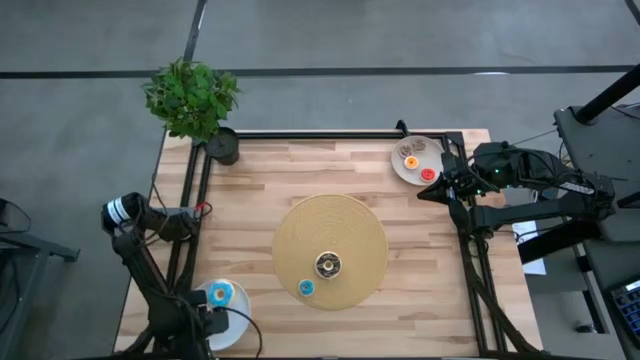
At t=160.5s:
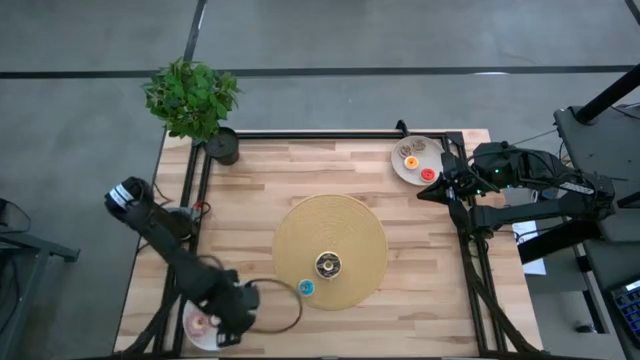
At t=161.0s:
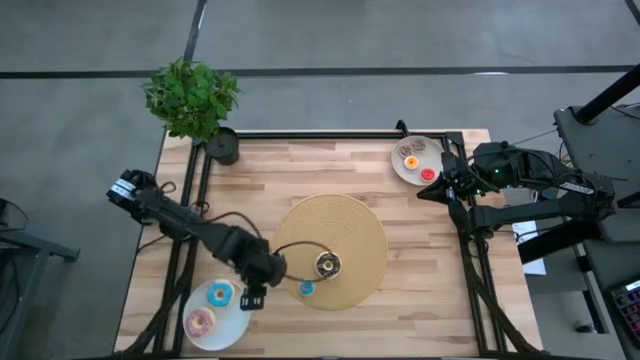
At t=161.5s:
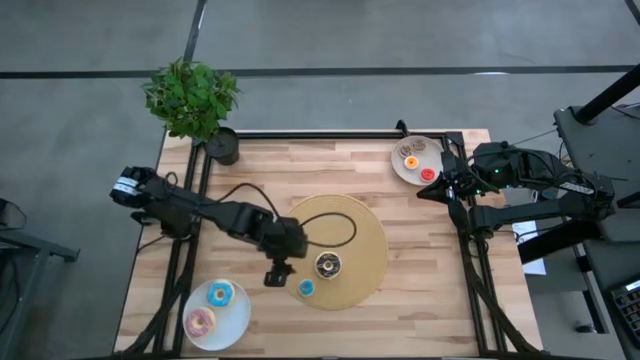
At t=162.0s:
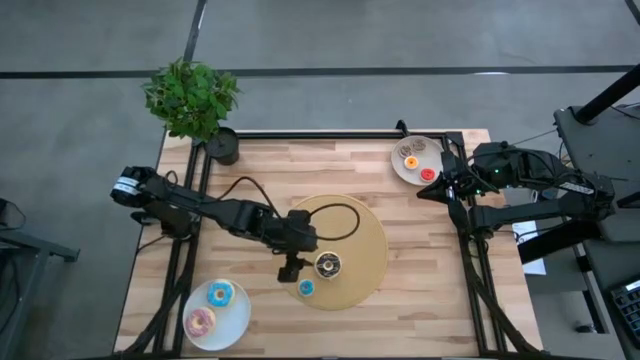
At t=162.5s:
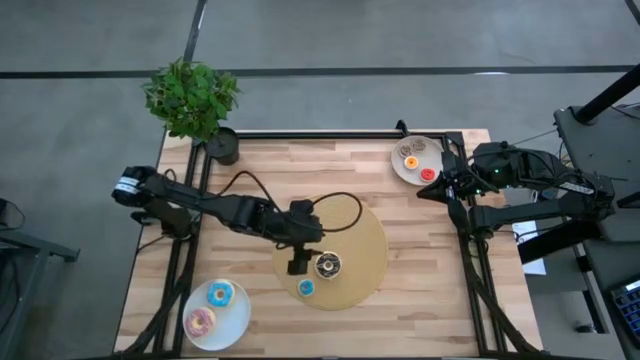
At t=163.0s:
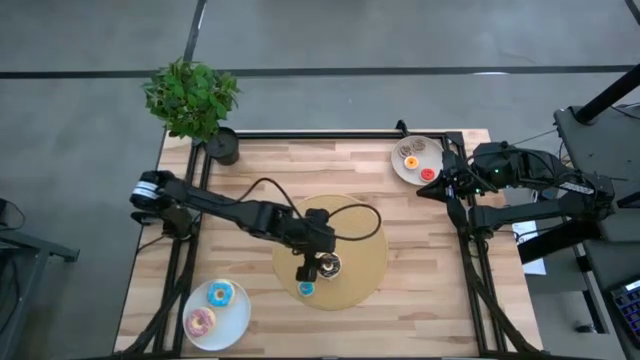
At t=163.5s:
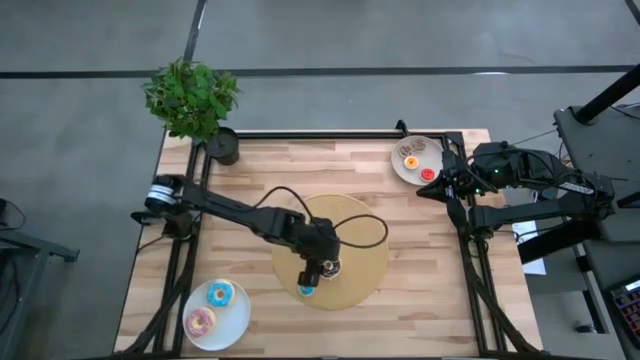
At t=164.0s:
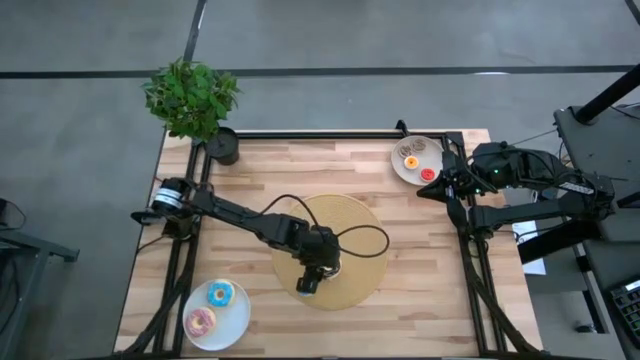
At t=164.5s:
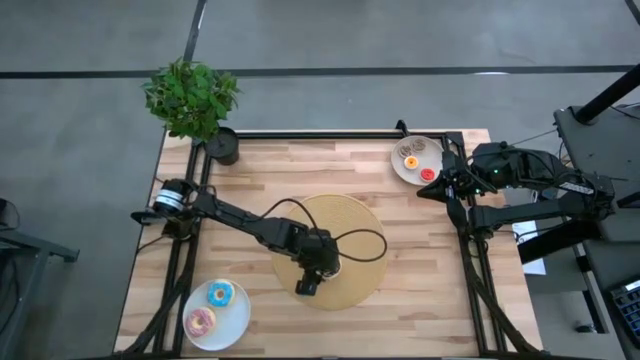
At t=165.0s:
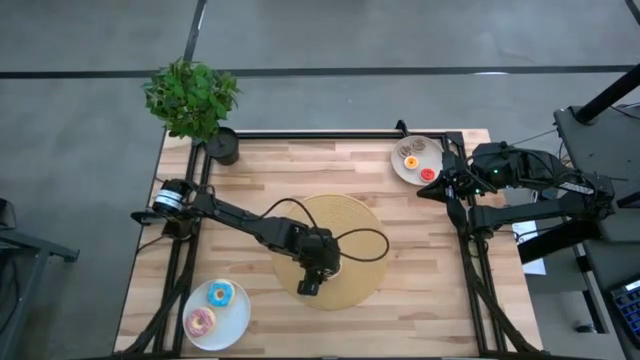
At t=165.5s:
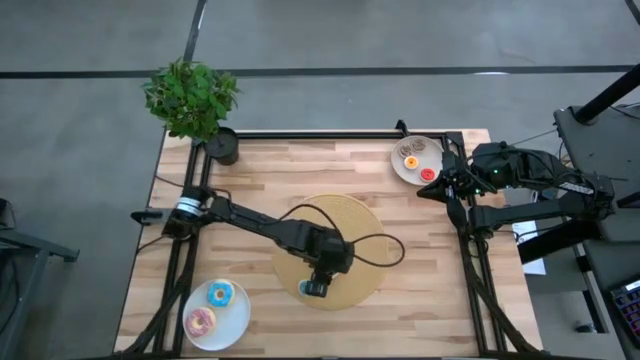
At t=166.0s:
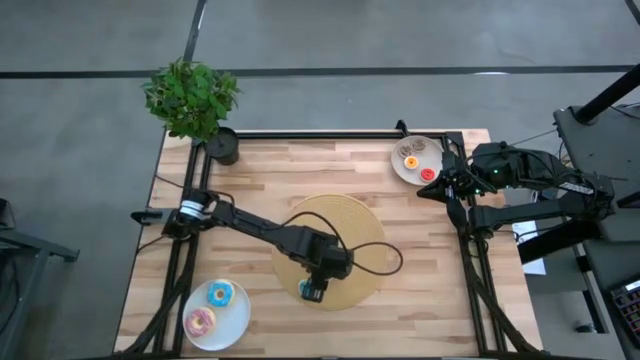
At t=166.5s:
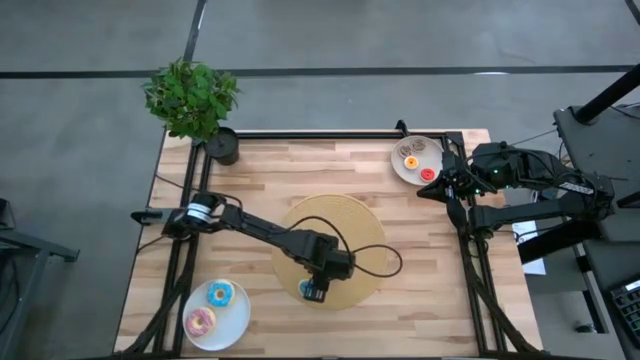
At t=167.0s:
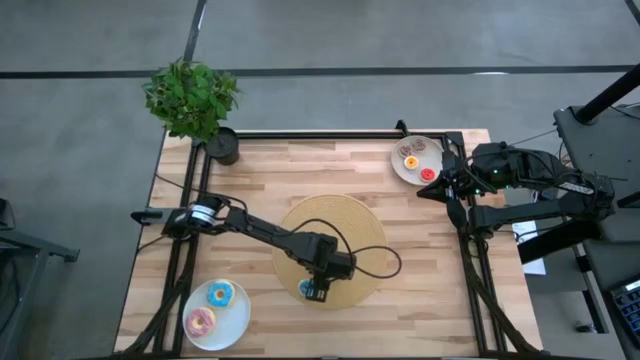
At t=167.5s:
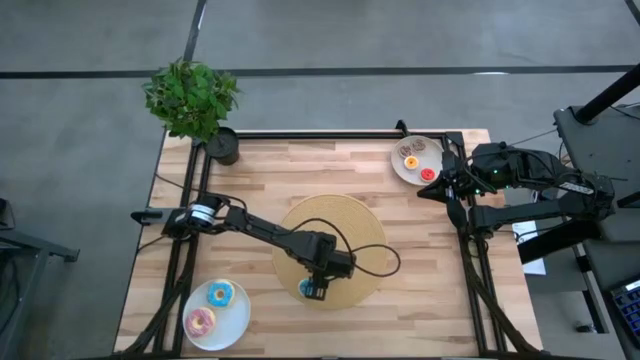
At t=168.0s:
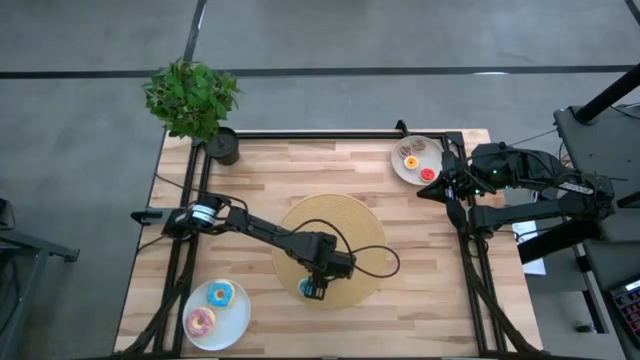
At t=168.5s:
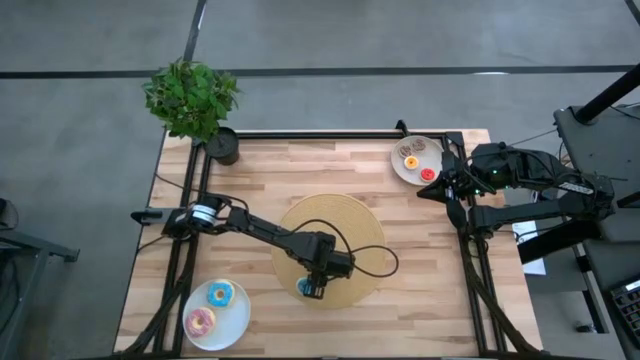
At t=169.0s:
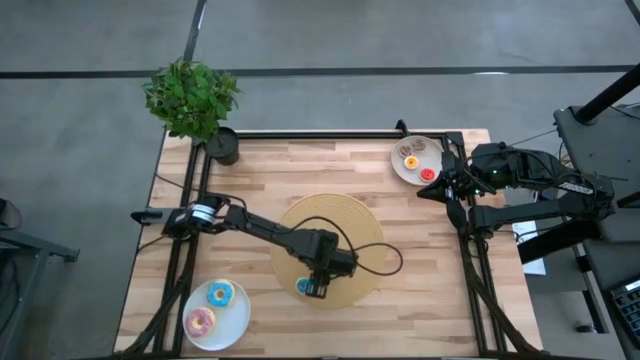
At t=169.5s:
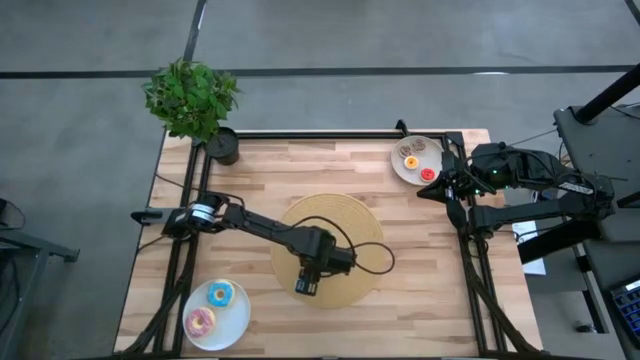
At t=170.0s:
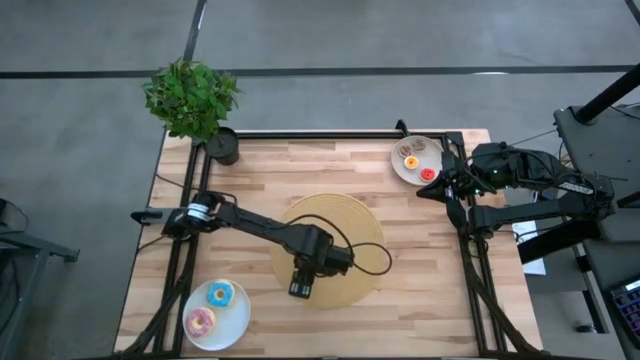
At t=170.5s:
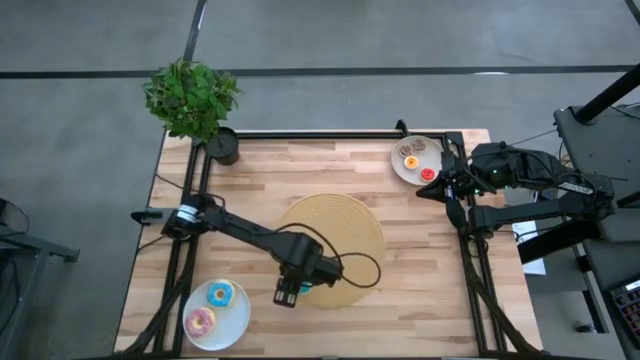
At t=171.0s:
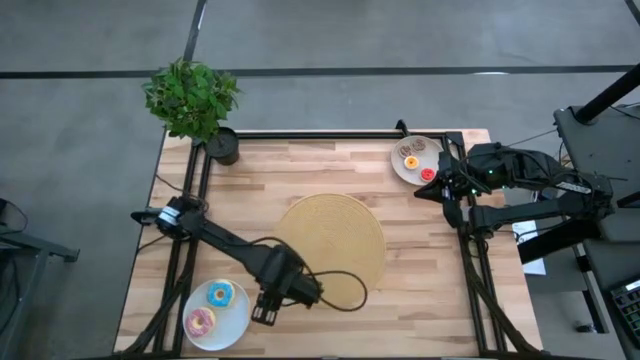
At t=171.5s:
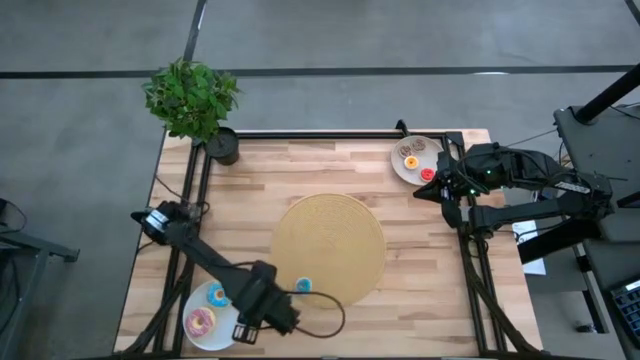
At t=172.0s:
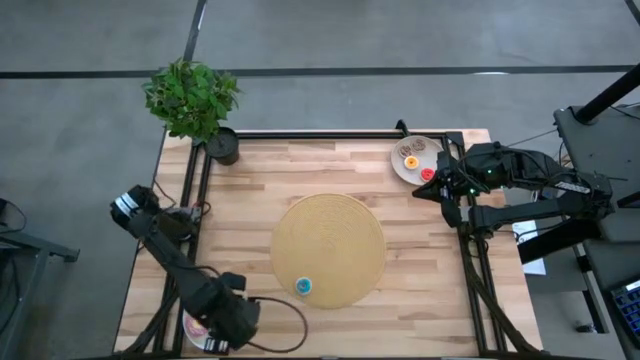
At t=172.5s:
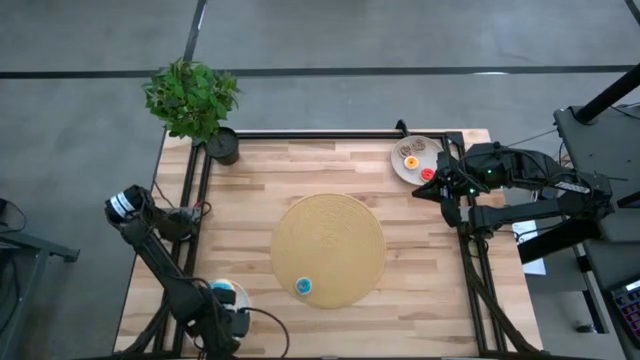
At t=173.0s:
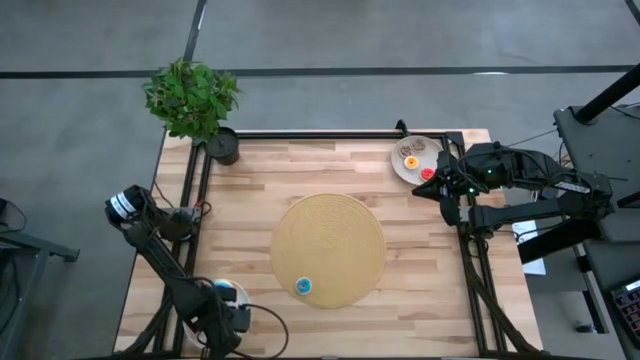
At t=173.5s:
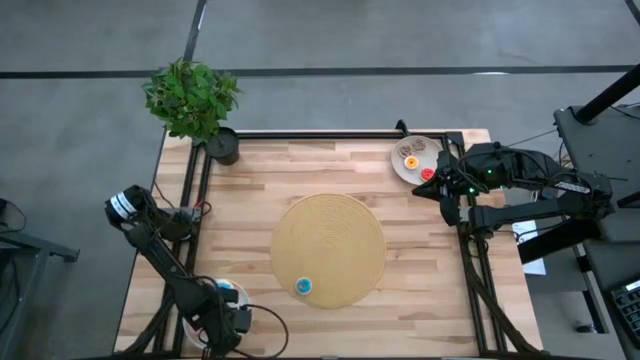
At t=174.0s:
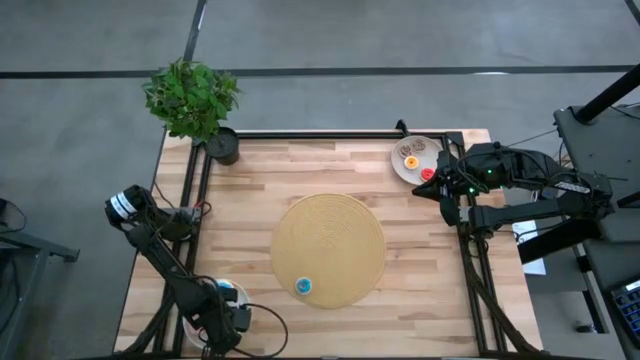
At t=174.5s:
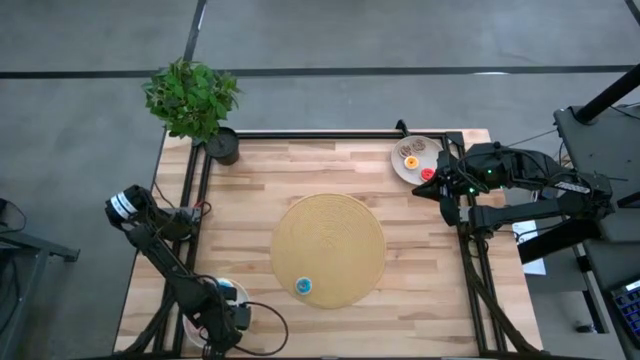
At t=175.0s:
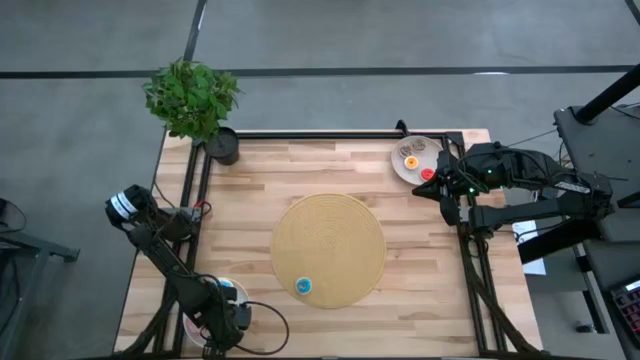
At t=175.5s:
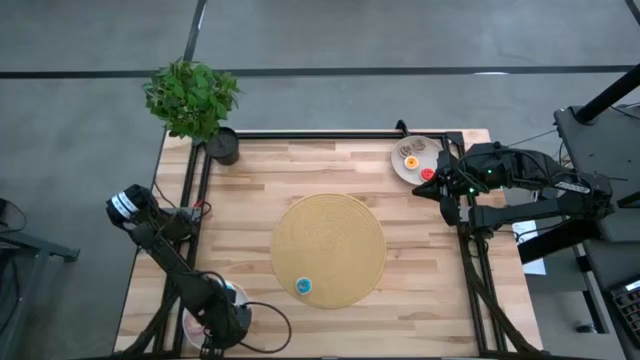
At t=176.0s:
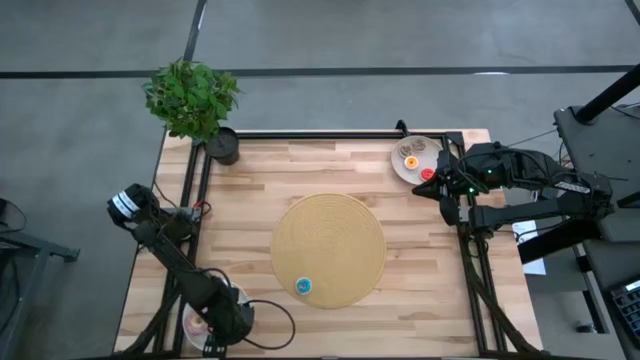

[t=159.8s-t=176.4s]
Task: Pick & Place donuts
Put the large black donut on the white plate

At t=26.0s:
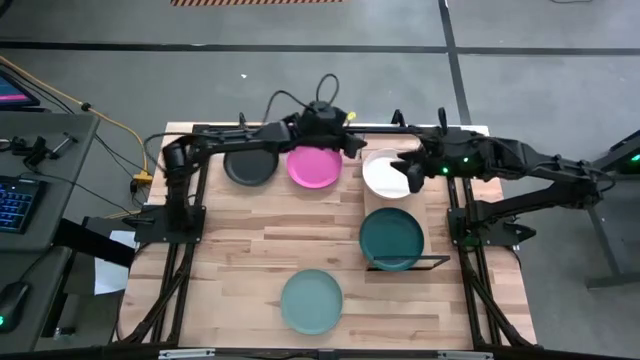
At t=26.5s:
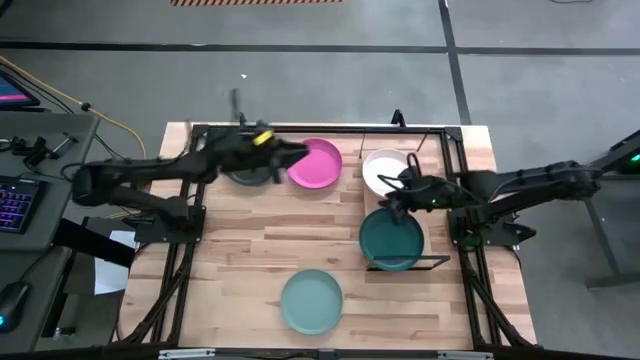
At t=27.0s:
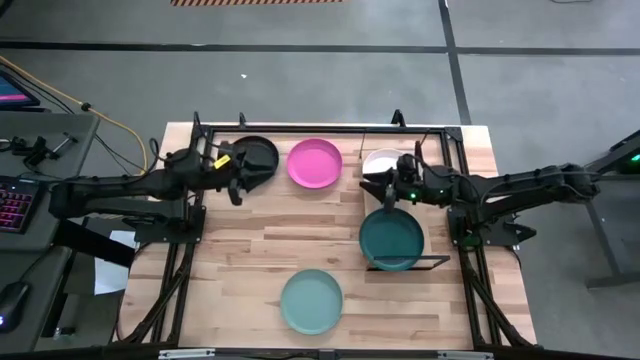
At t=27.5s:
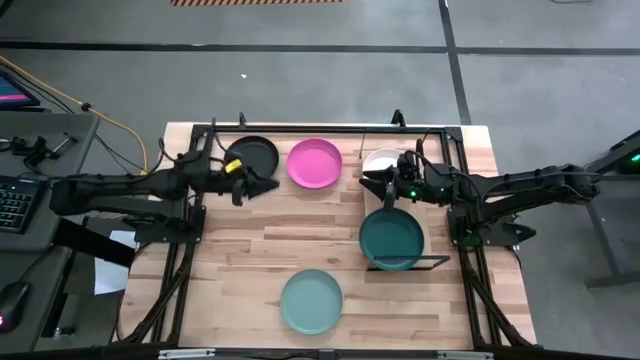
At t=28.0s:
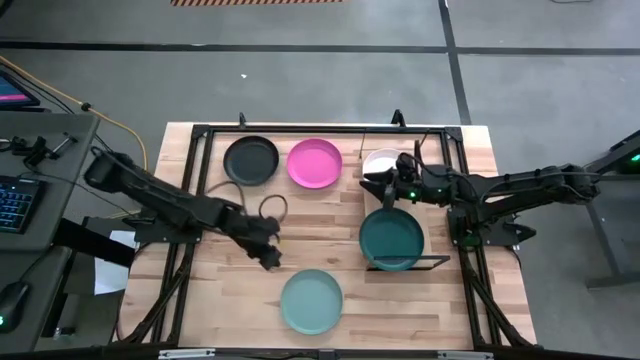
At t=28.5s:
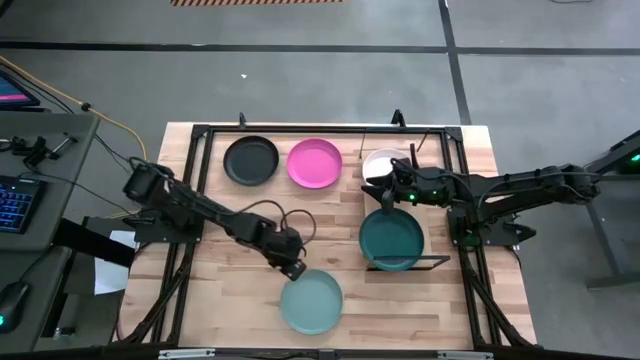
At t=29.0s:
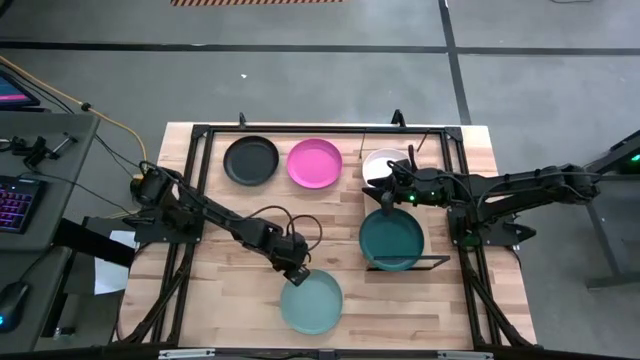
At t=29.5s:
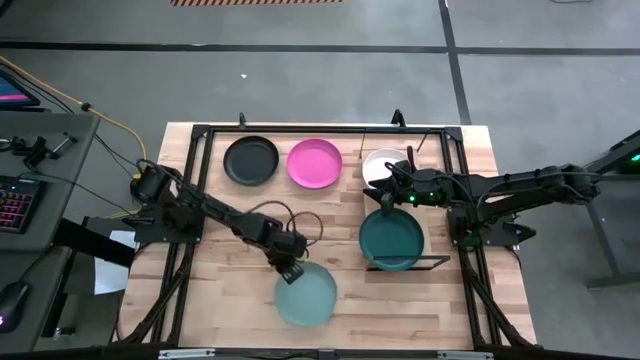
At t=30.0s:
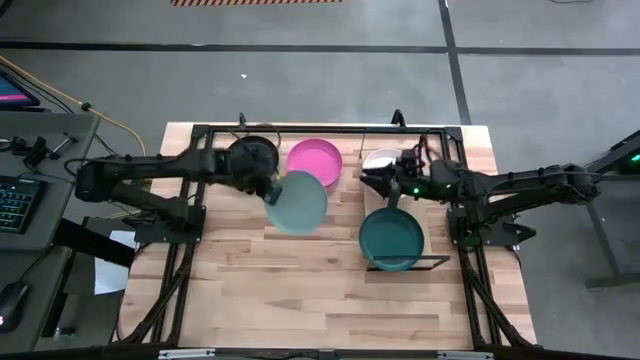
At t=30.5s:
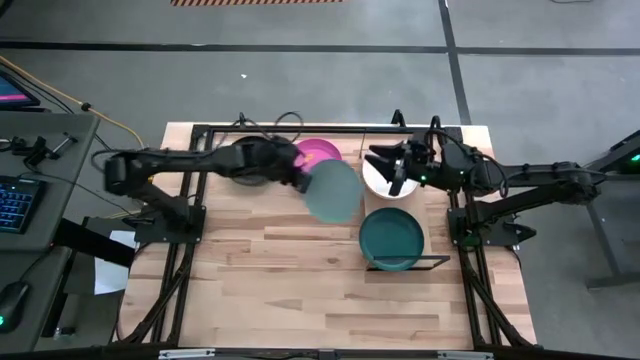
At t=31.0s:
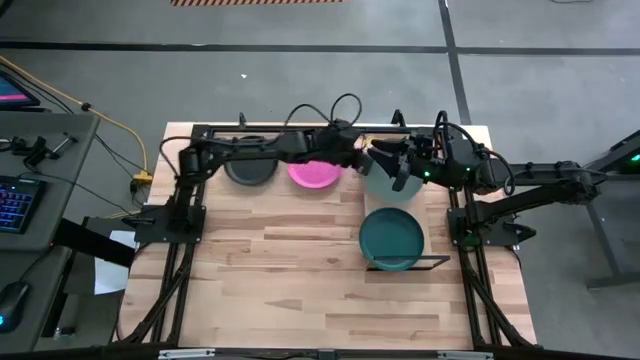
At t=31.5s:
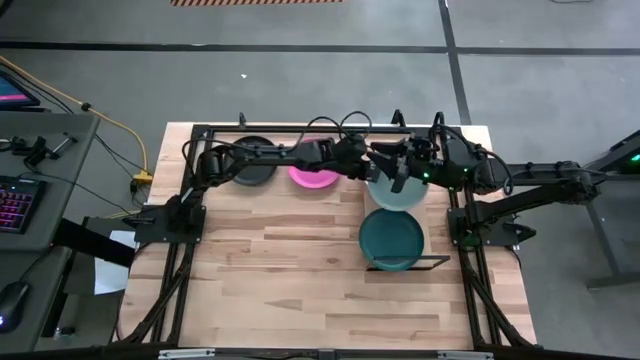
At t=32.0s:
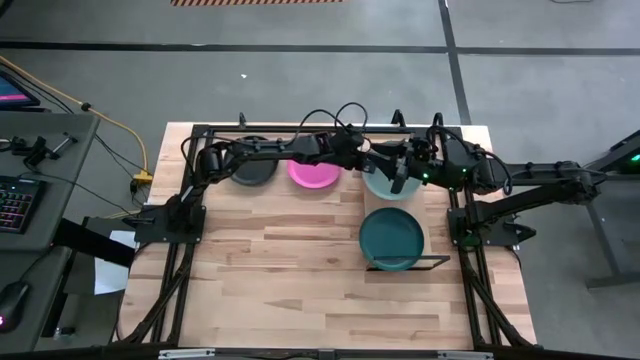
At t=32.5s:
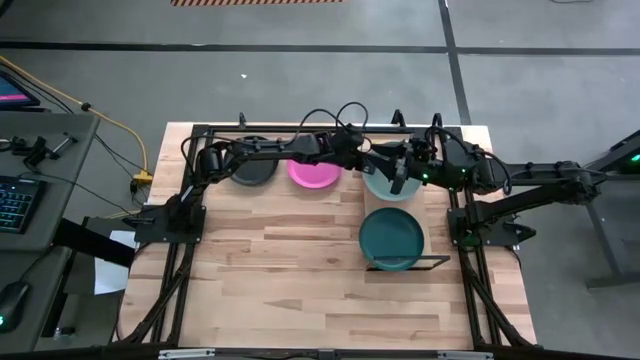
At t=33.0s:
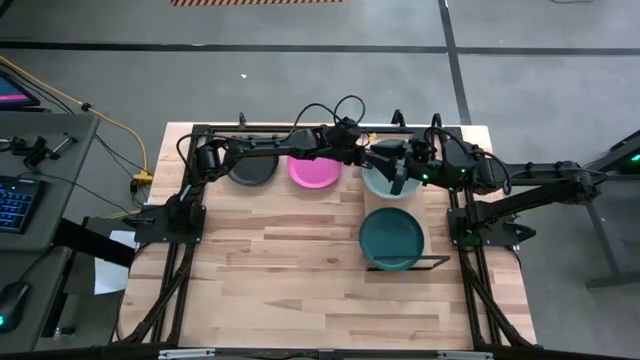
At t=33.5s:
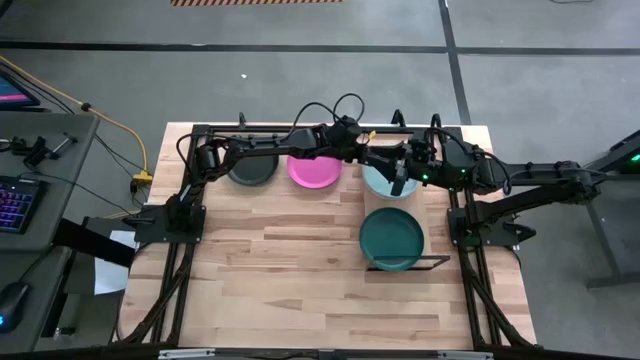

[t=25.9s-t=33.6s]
Task: Place and stack plates onto a shelf
Stack the blue plate on top of the white plate
